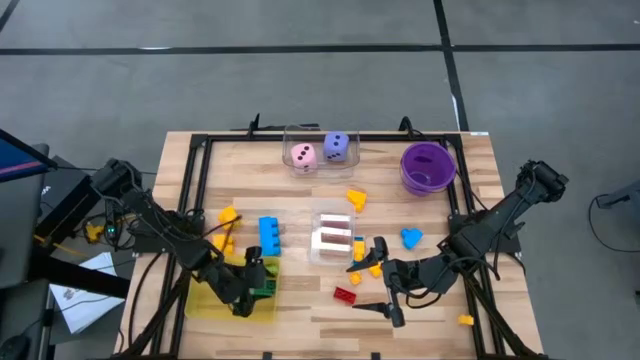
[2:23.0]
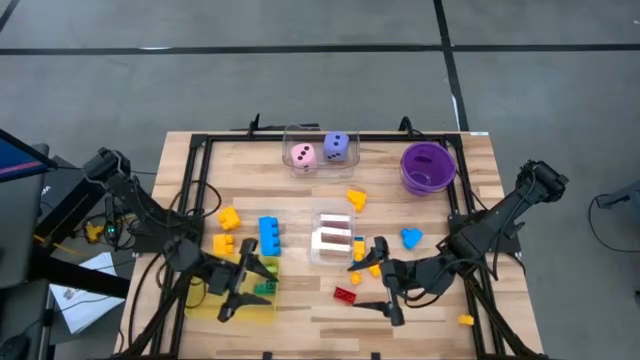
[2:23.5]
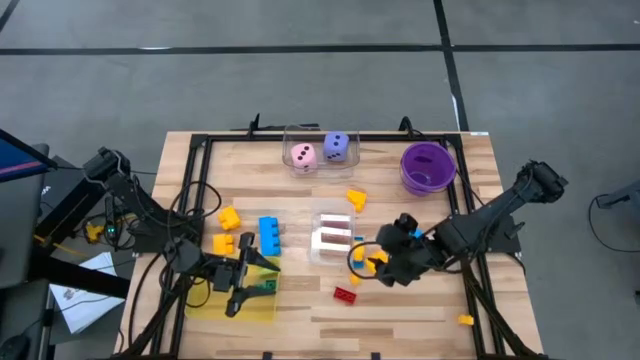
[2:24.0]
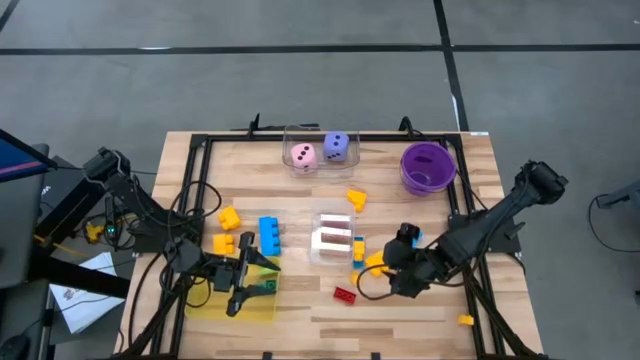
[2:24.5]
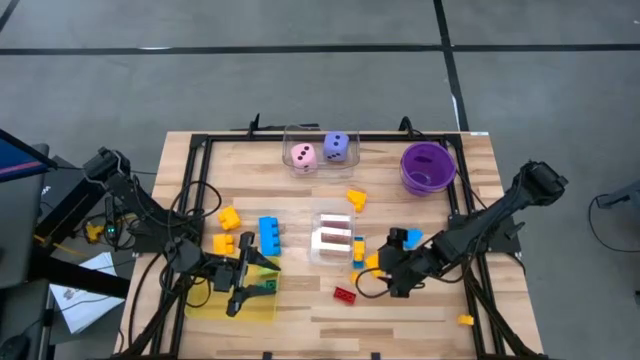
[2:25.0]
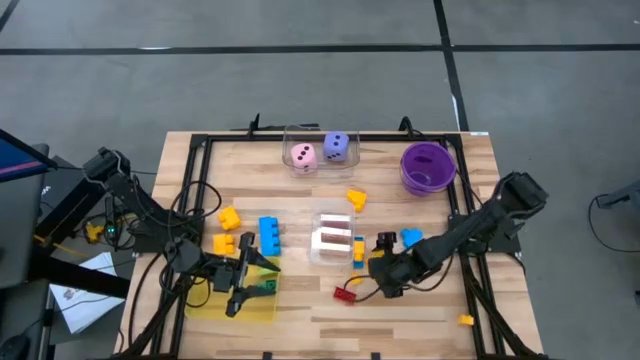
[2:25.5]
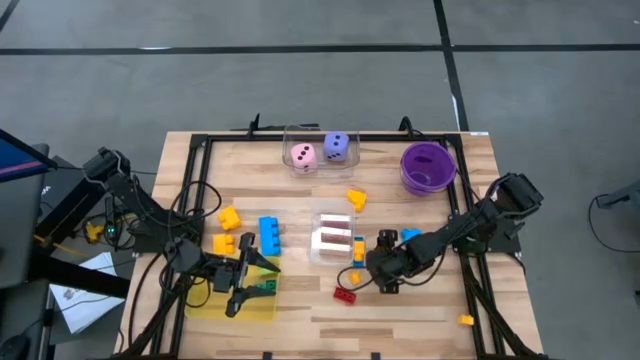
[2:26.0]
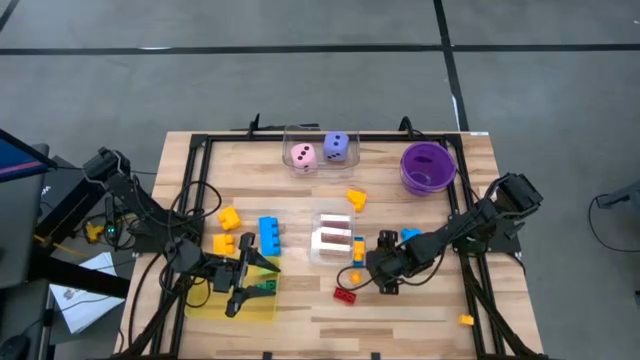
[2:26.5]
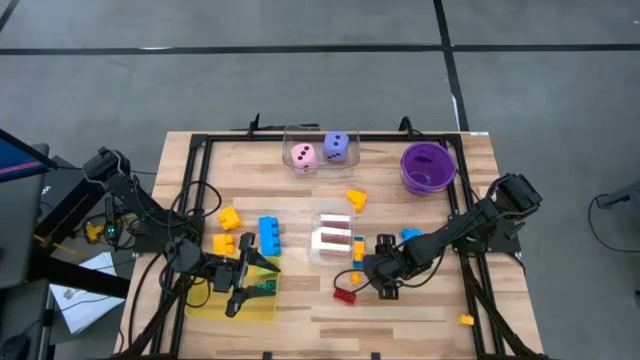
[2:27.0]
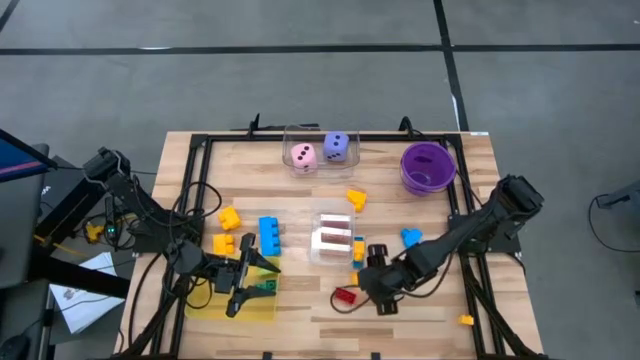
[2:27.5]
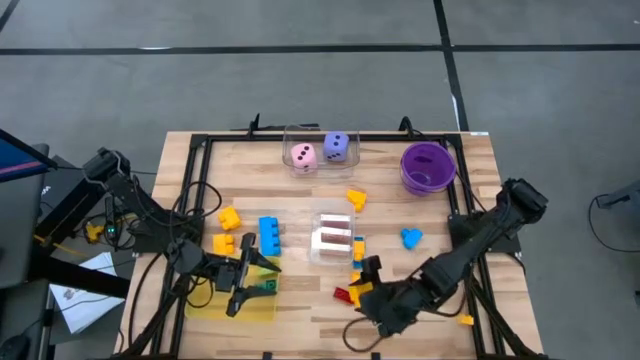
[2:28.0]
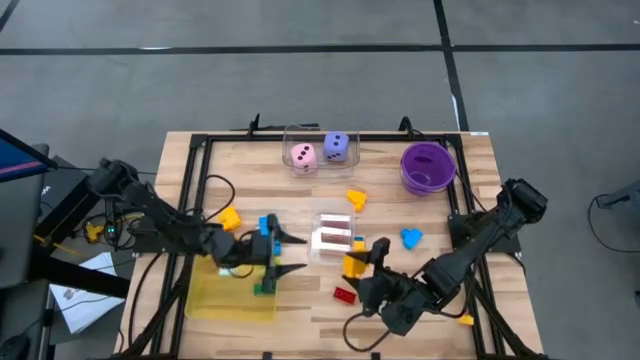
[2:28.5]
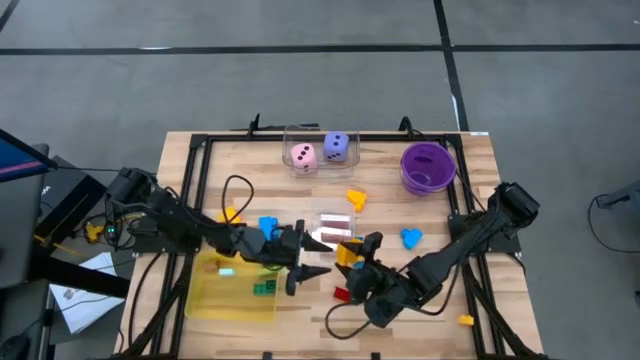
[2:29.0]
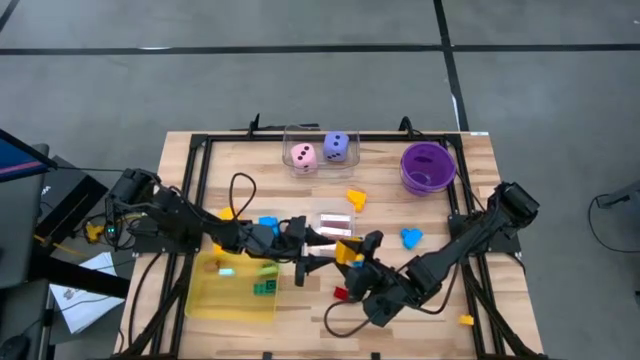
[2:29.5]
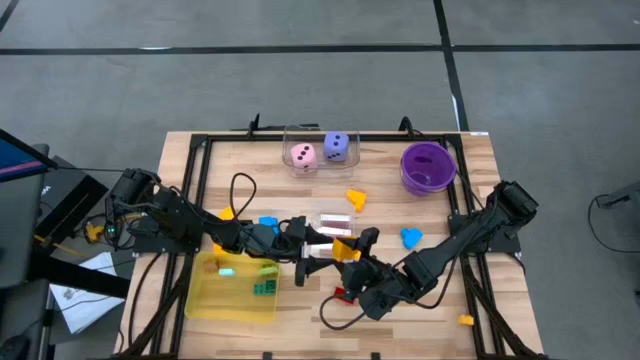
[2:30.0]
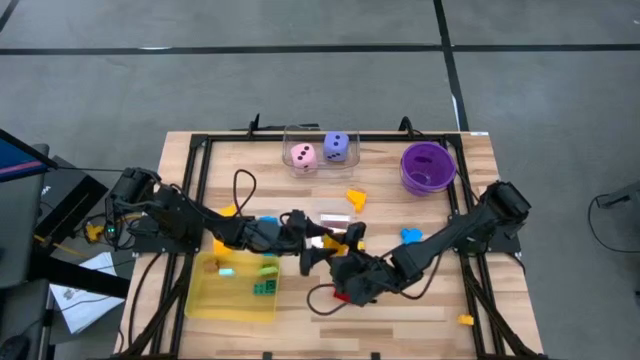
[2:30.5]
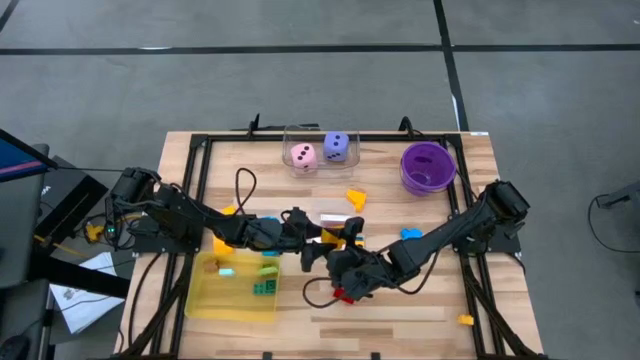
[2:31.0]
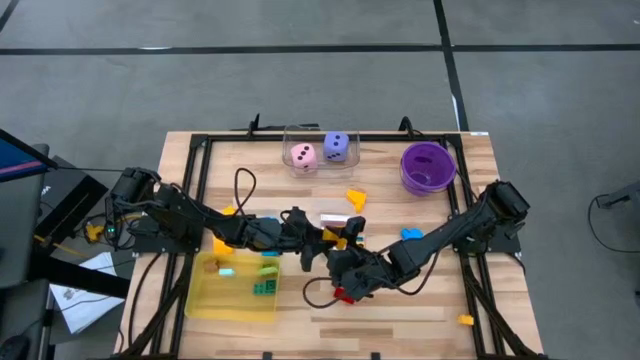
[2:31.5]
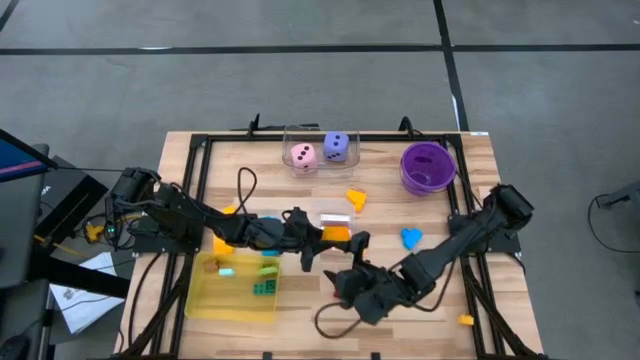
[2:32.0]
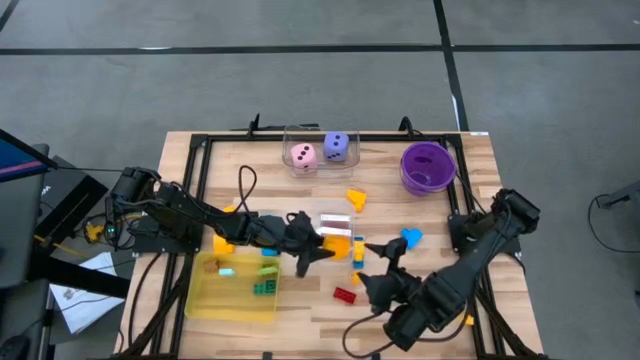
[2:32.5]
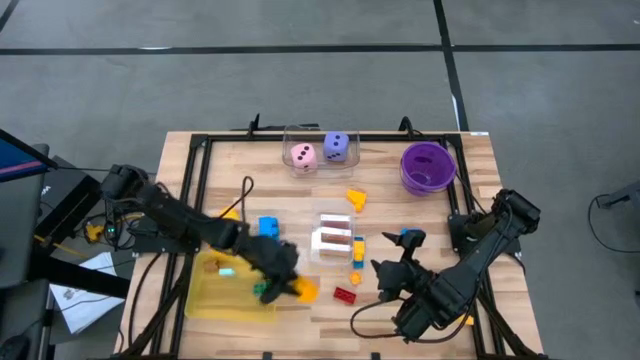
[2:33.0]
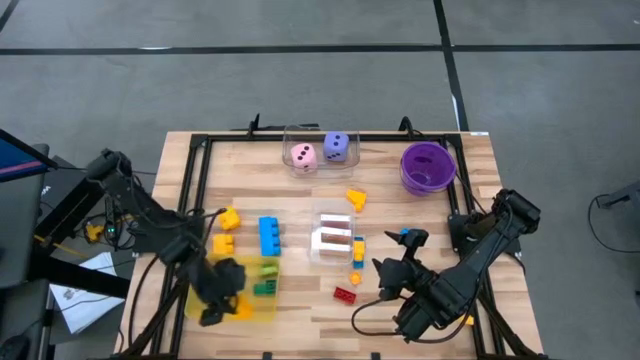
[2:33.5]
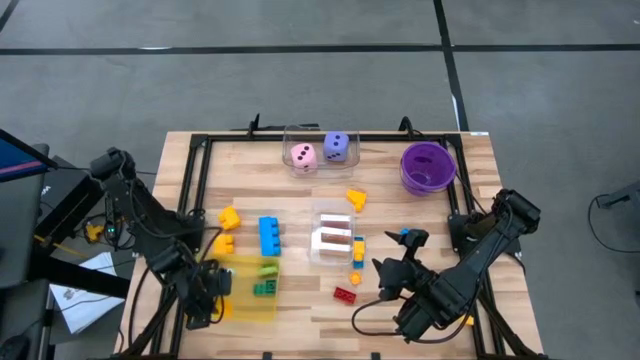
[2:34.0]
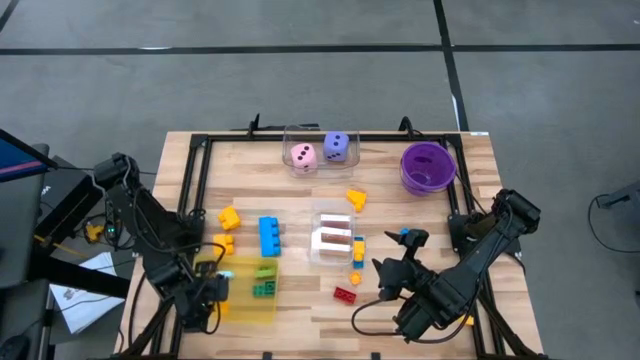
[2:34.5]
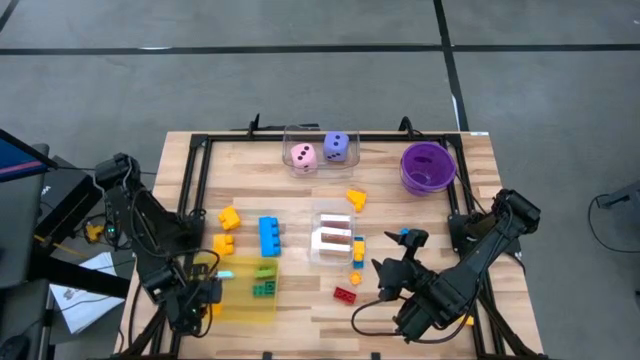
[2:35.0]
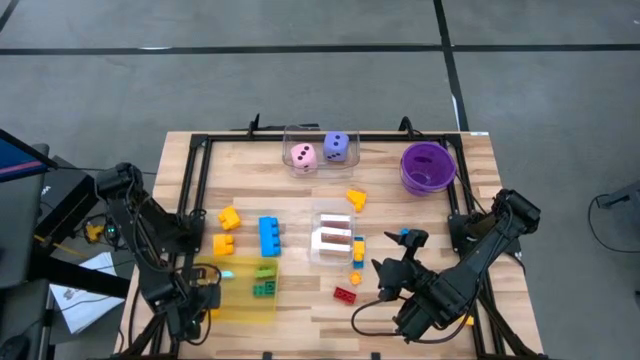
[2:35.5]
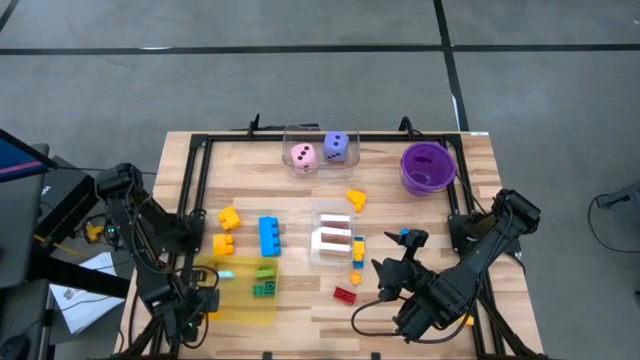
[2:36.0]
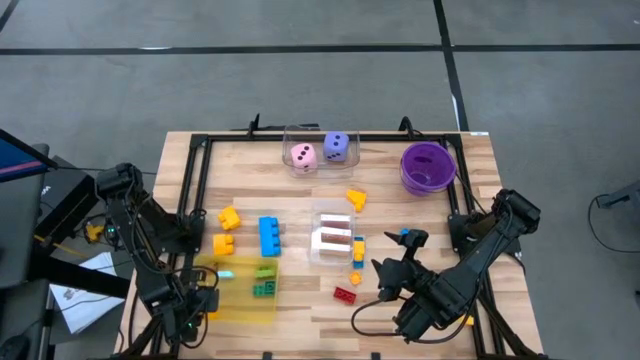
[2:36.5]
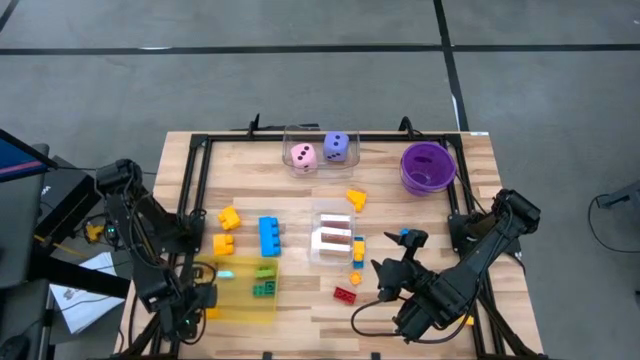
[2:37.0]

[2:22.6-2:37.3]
Task: Pick & Place Toys
Put the yellow game piece into the yellow bin

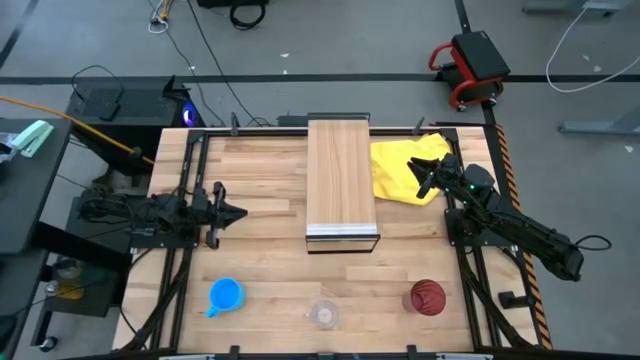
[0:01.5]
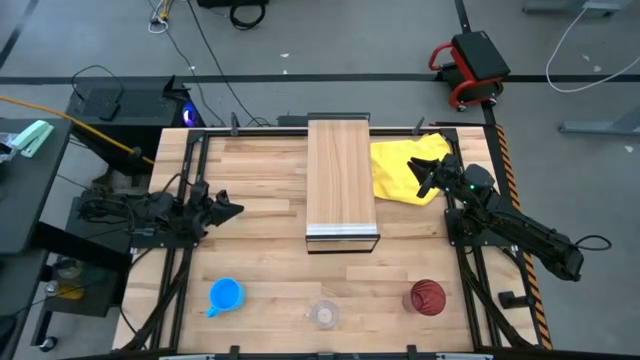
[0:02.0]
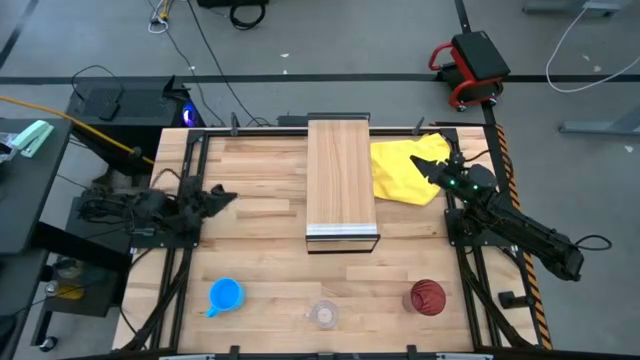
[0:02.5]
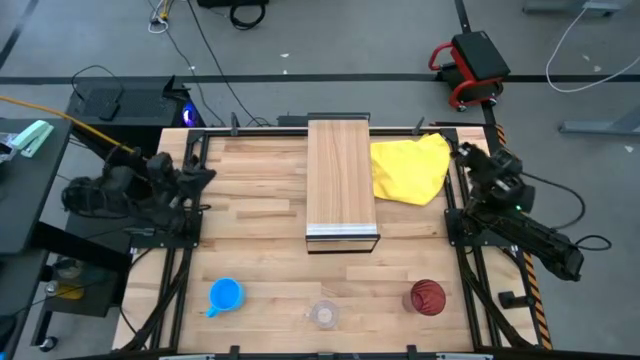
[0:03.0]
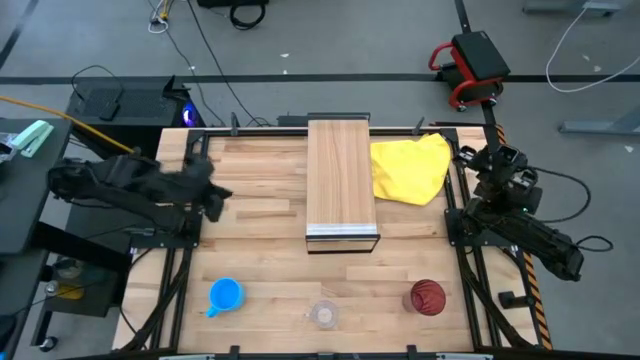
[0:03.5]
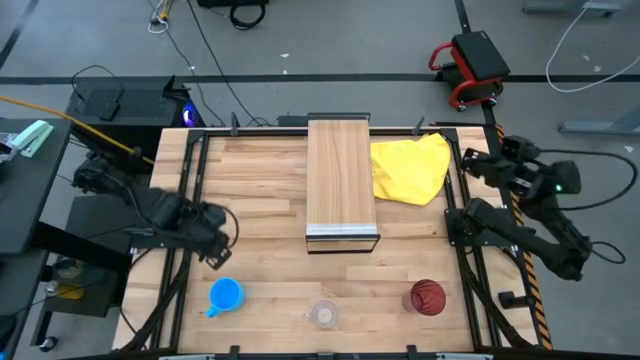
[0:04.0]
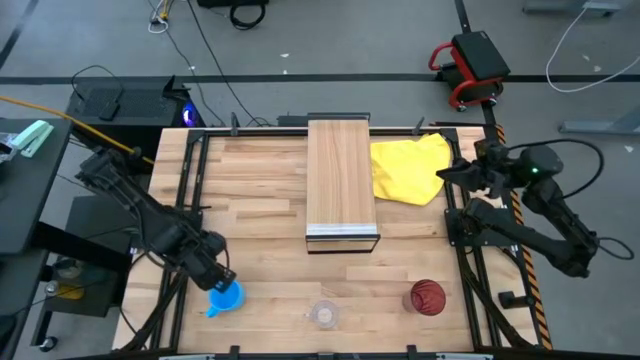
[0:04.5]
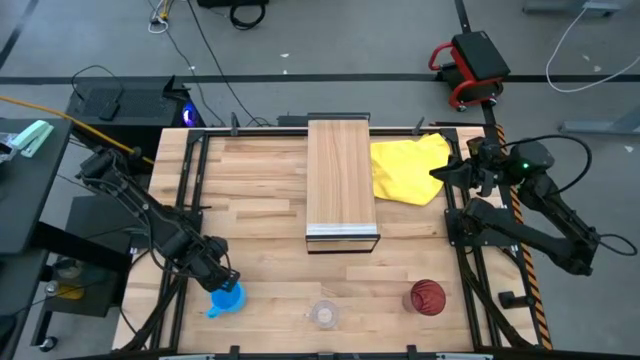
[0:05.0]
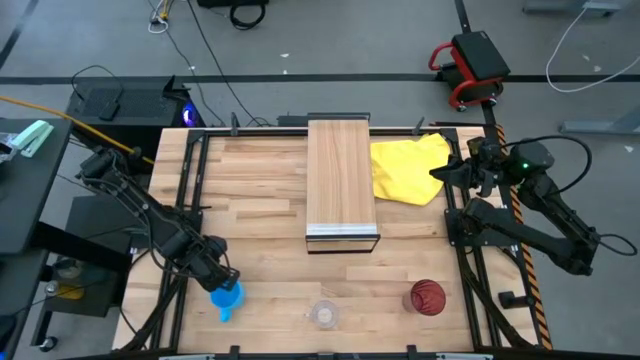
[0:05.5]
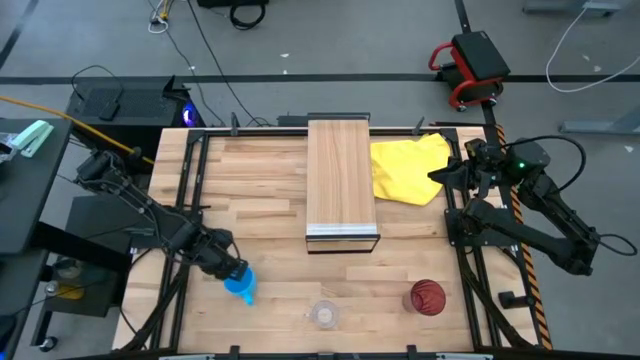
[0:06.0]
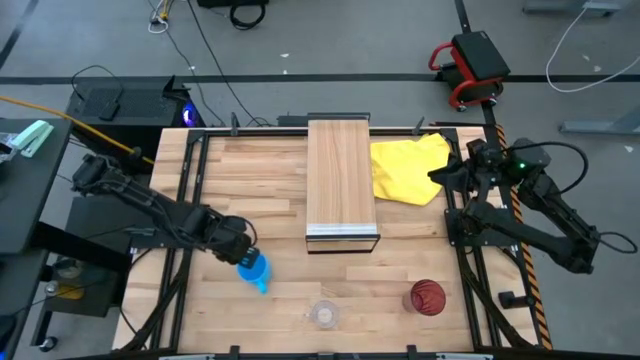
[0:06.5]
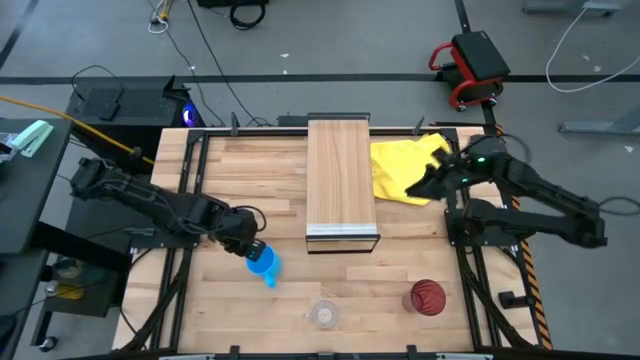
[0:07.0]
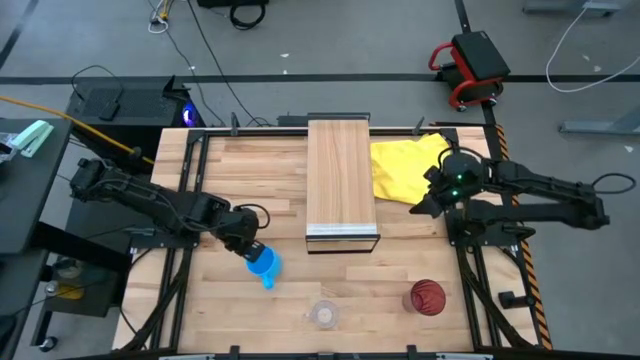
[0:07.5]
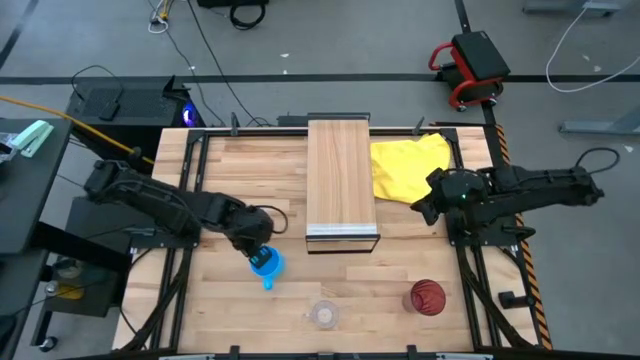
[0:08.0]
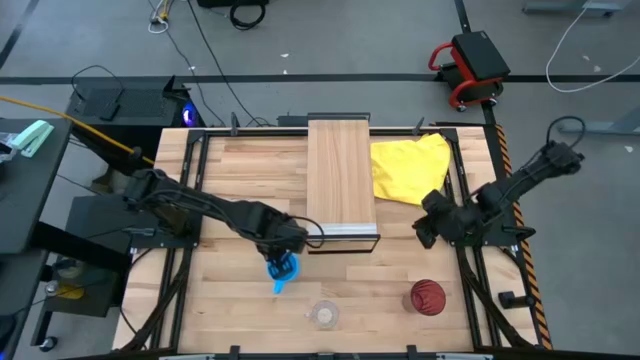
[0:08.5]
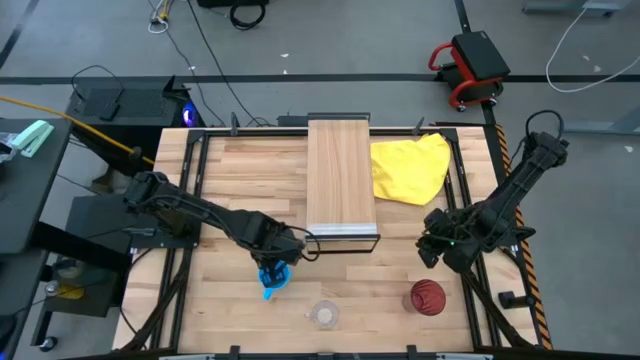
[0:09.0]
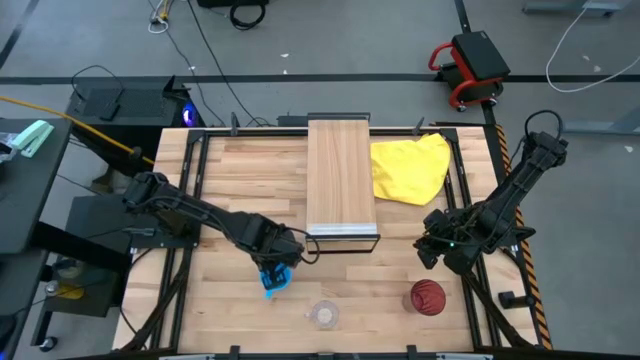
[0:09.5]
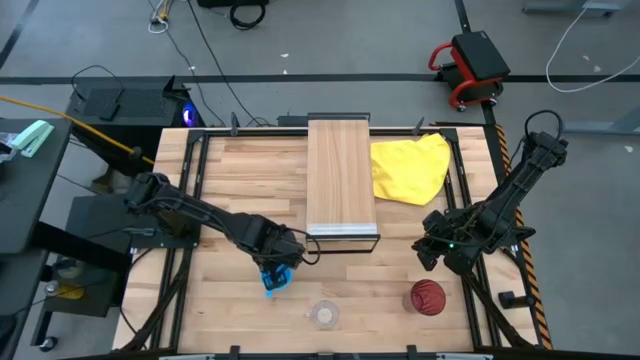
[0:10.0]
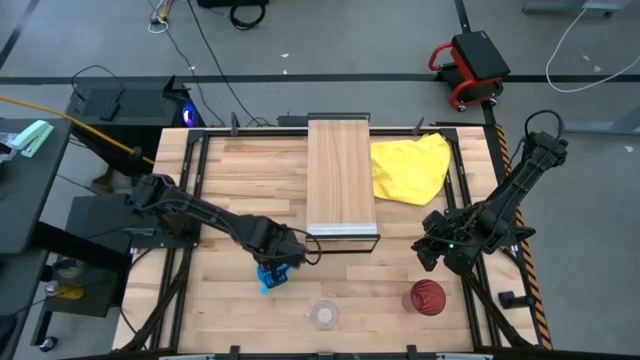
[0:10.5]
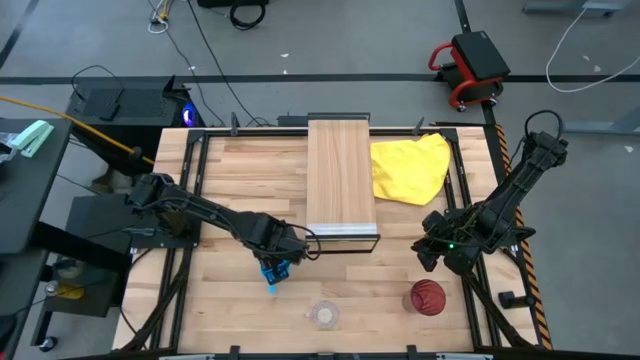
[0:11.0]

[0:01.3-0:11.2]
Task: Stack small to large cups/mugs on shelf
Move the blue mug to the bottom left of the shelf
